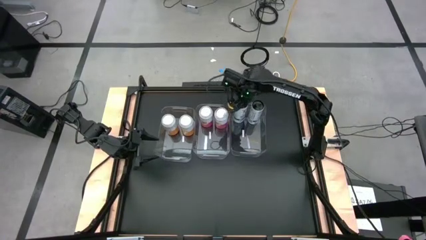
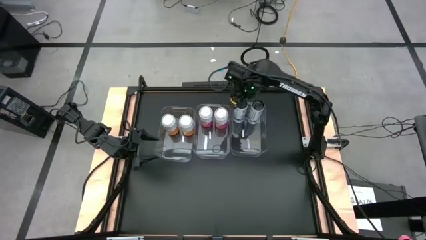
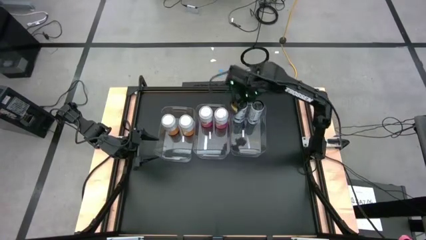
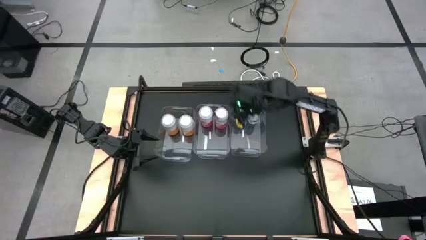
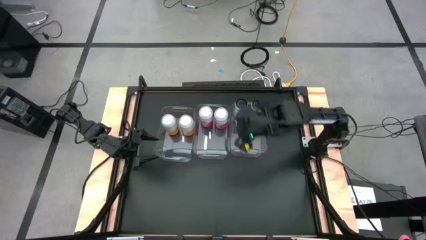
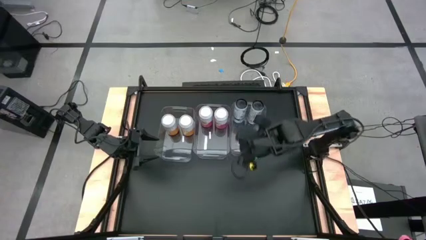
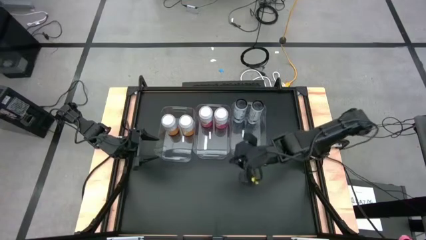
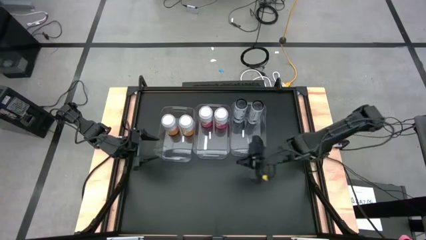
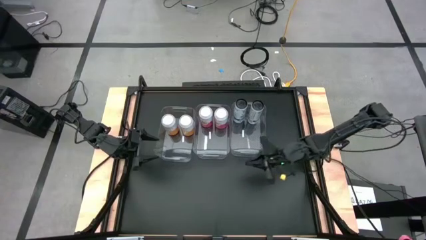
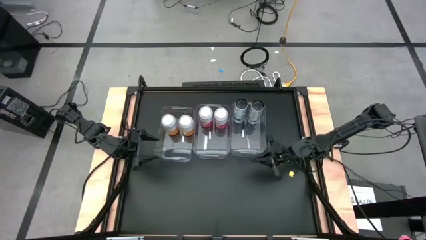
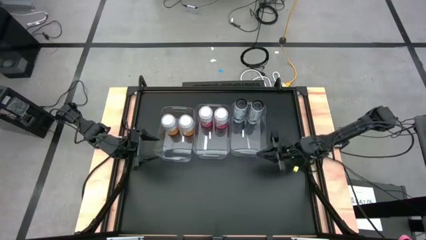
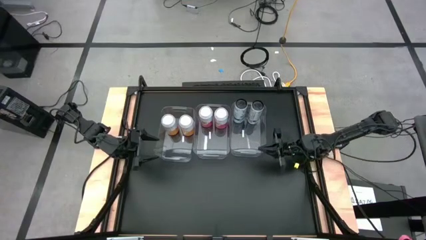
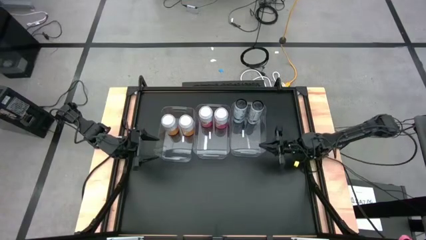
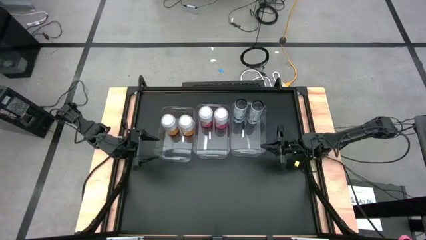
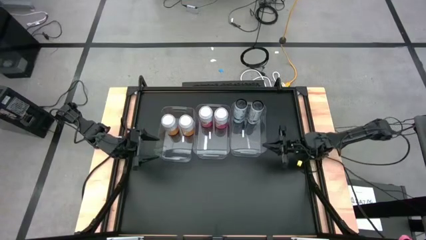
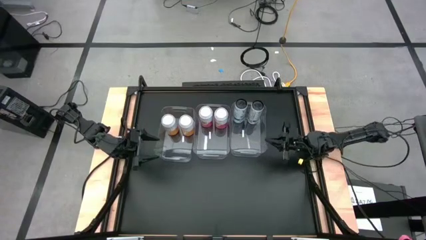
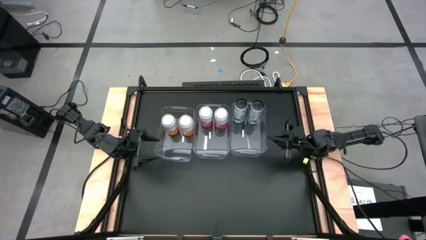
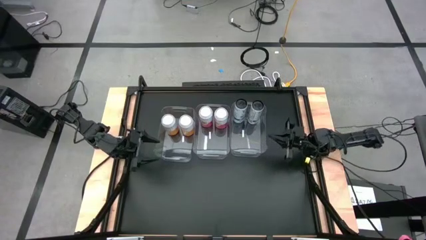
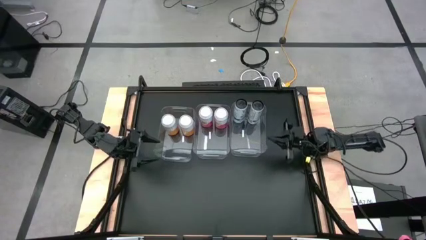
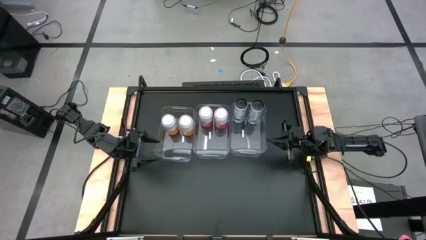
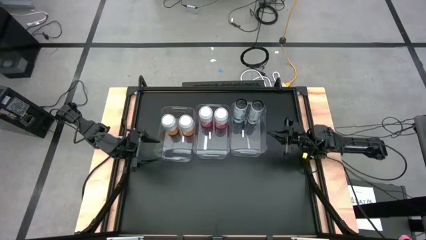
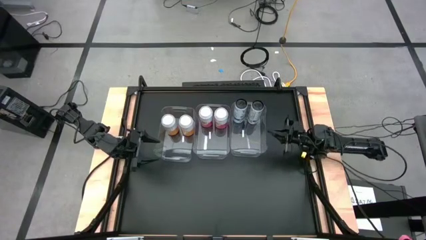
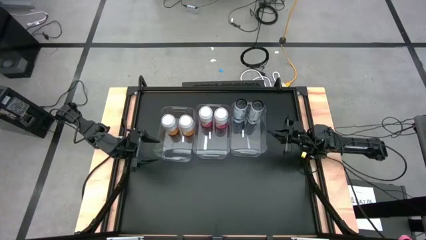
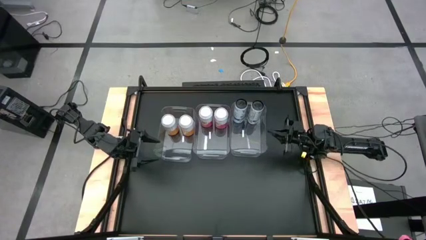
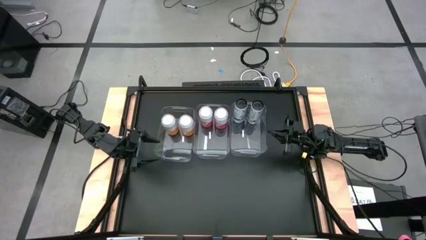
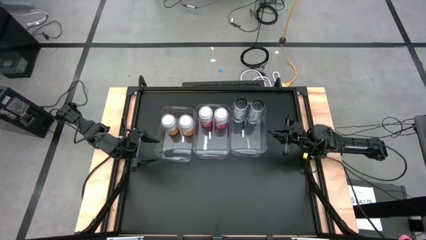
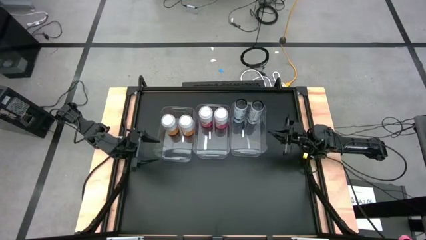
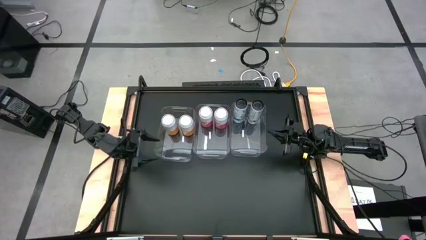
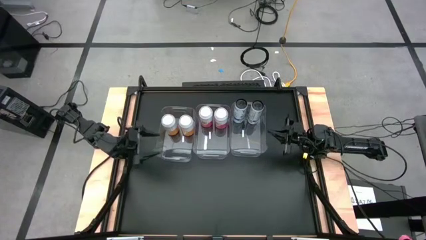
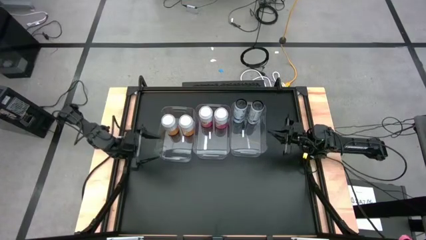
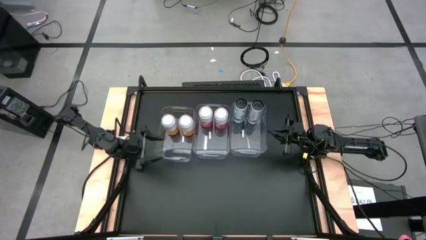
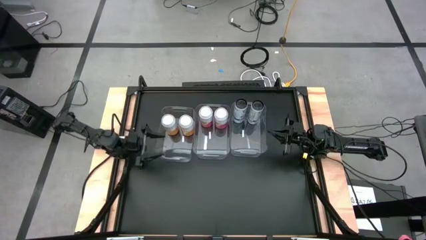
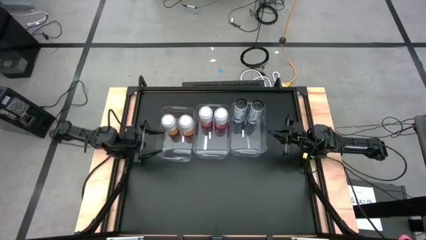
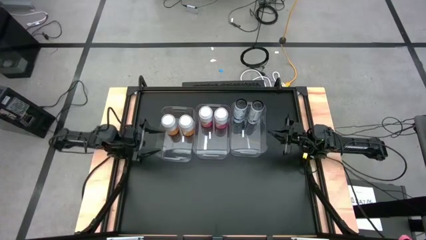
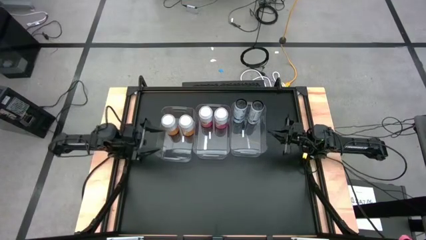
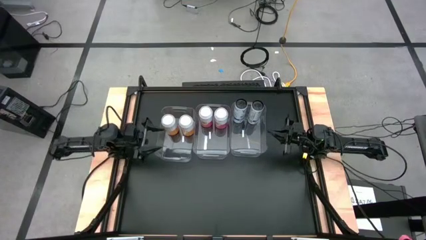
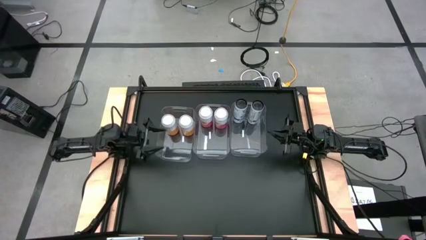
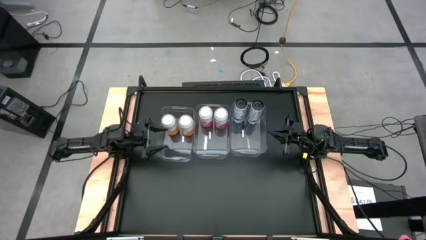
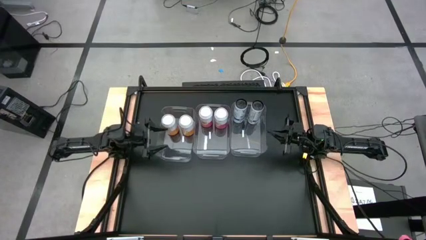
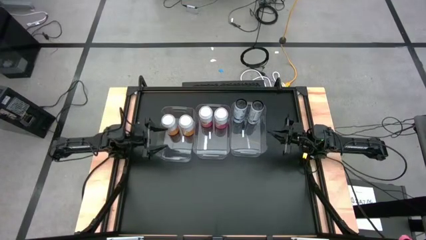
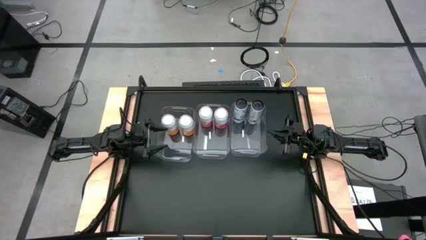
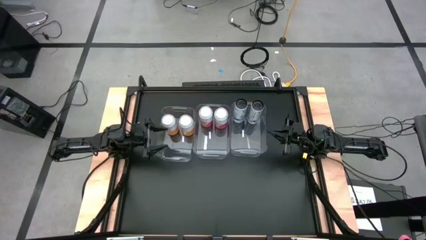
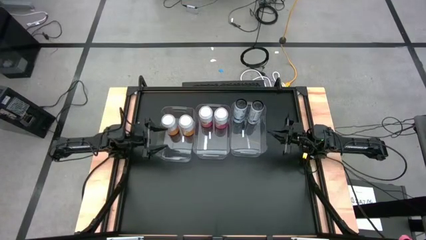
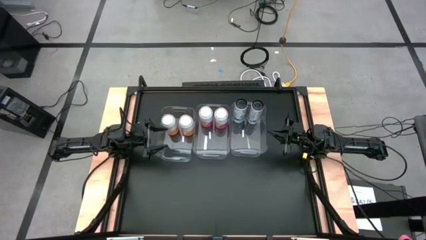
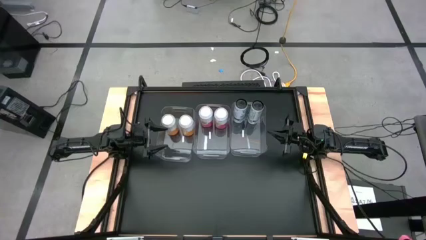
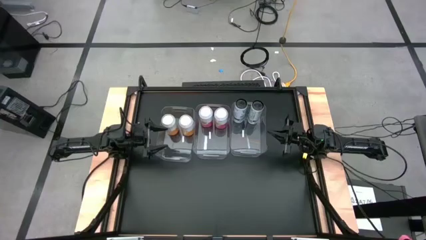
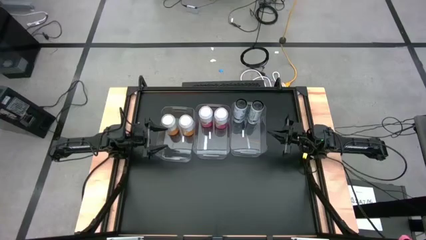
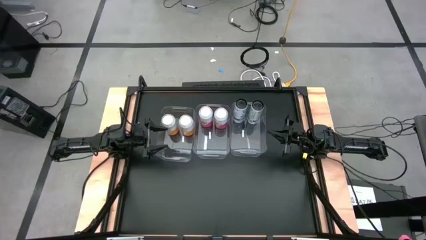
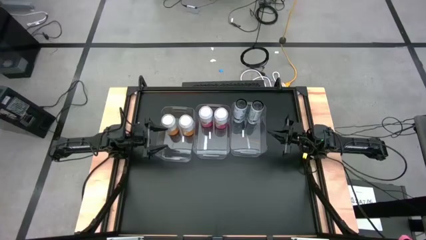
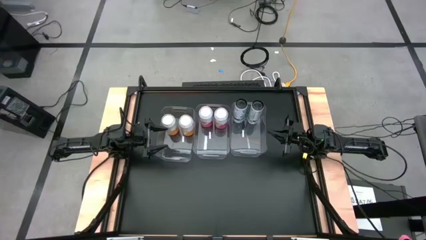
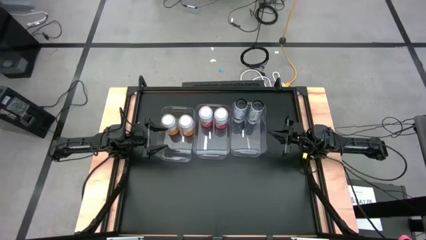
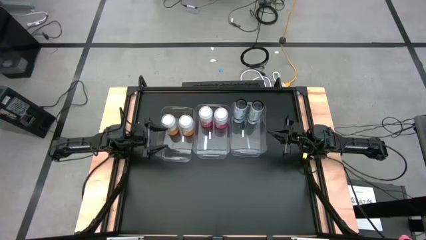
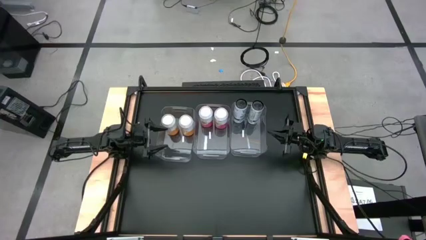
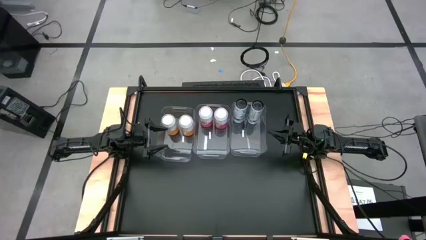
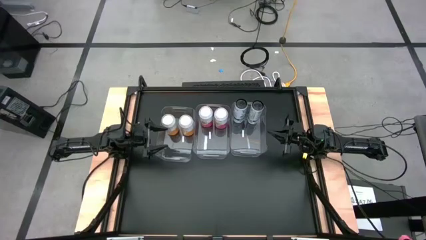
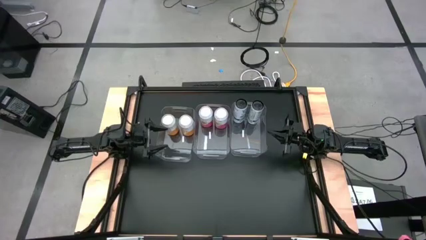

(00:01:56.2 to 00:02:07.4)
Task: Sort soda cans
Return to Home Position

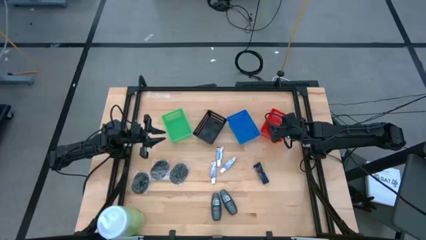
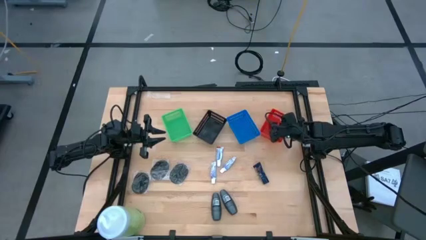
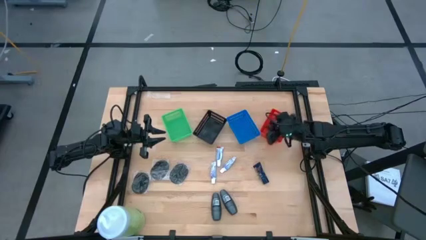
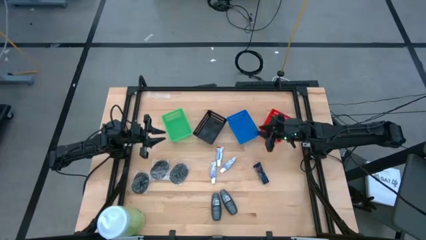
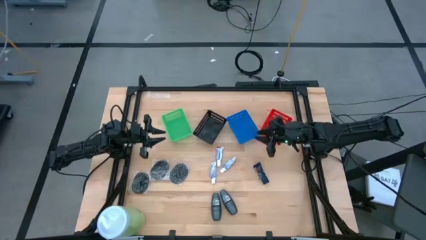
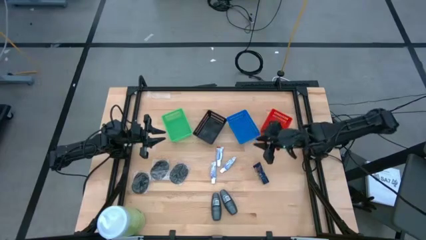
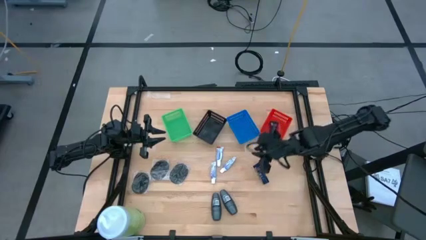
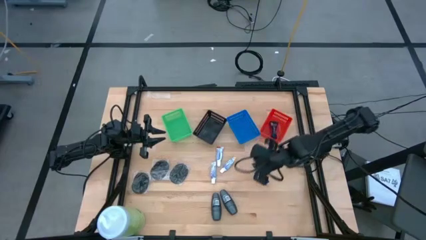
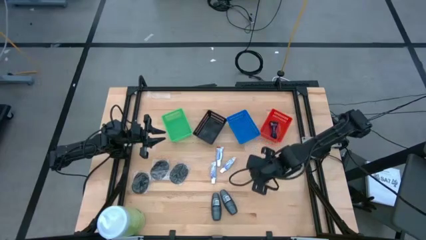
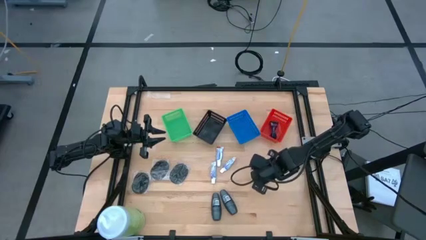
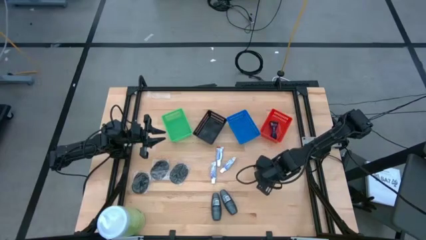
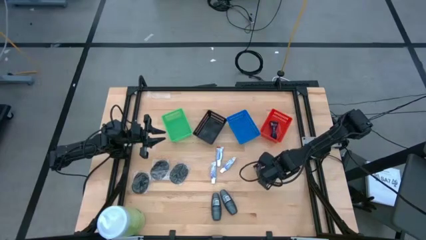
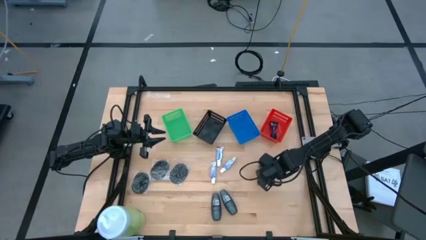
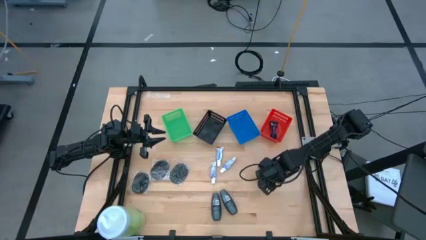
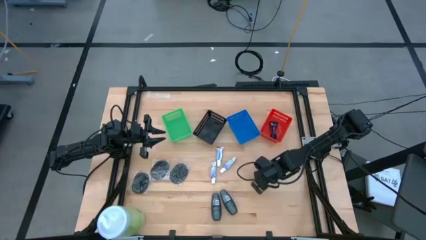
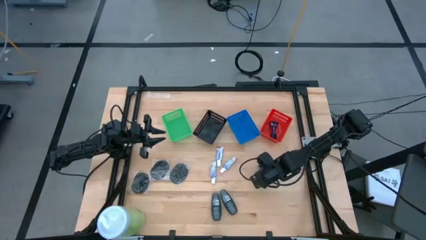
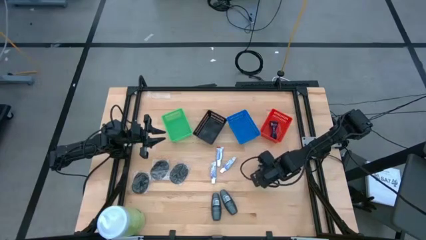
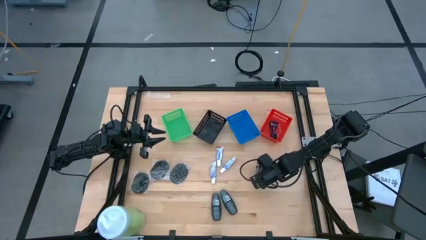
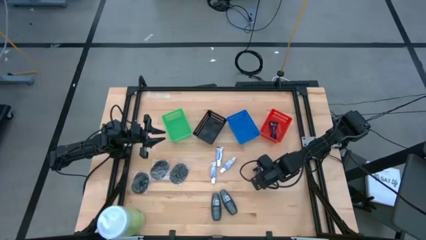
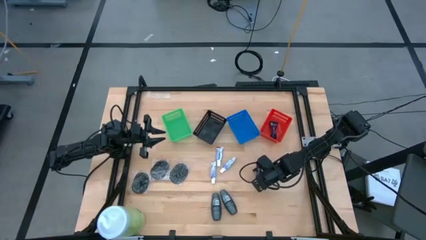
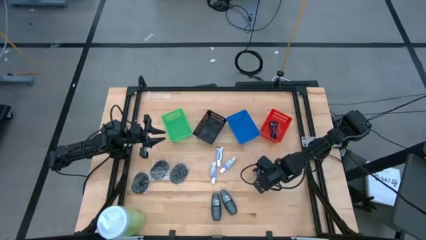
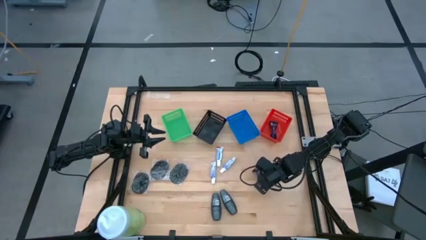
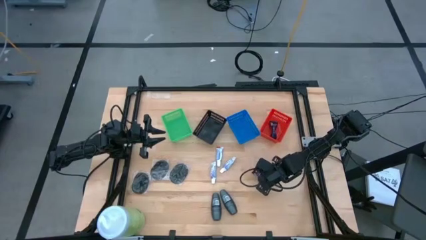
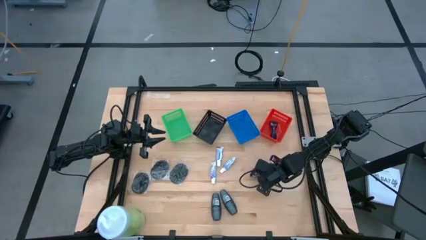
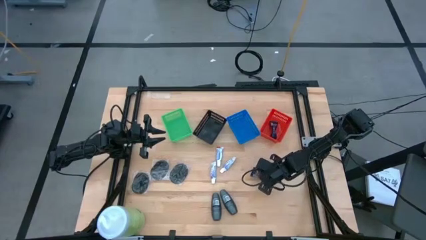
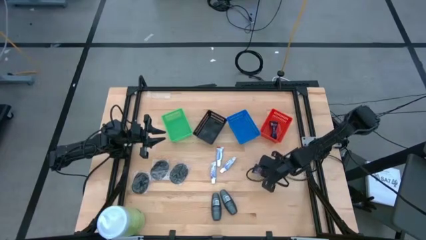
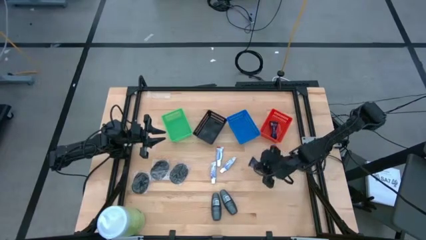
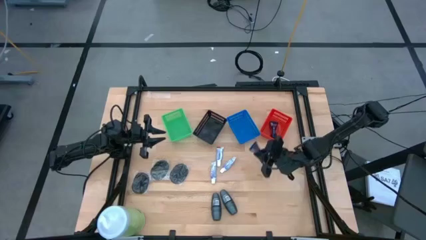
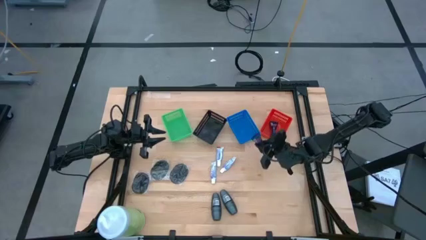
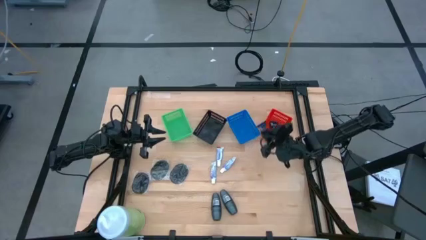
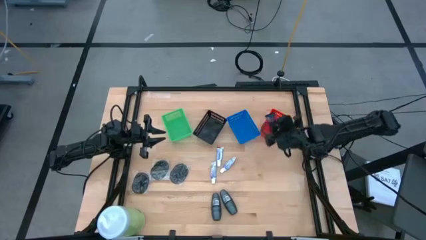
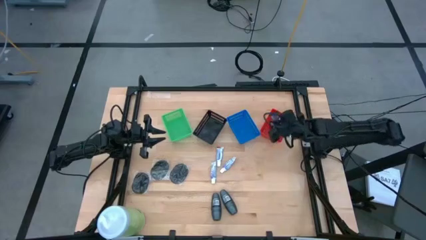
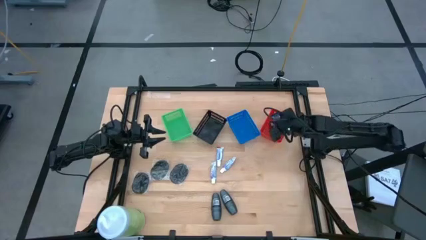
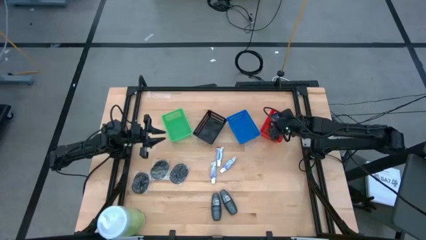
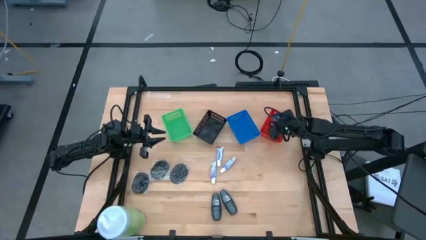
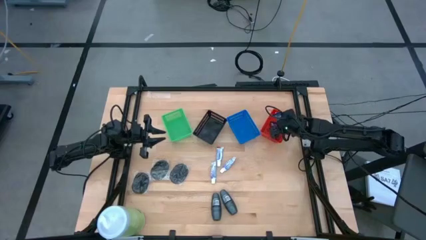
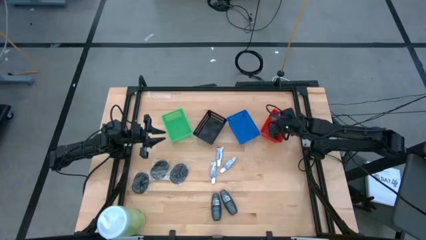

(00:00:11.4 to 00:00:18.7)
Task: Pick & Place Travel size toiletries
Put the blue shave cream into the red bin
